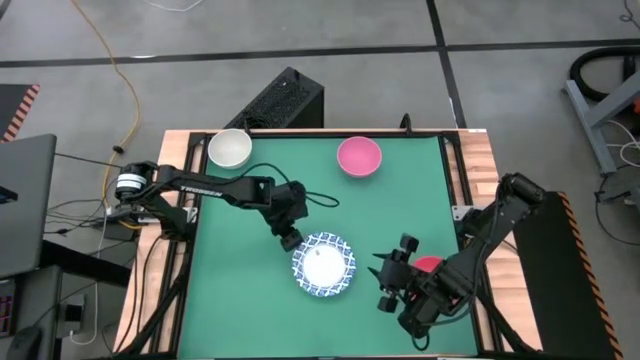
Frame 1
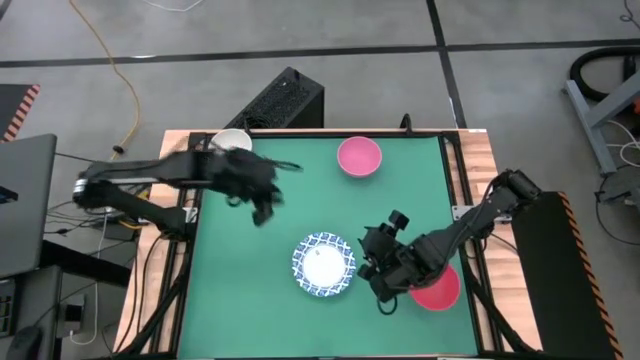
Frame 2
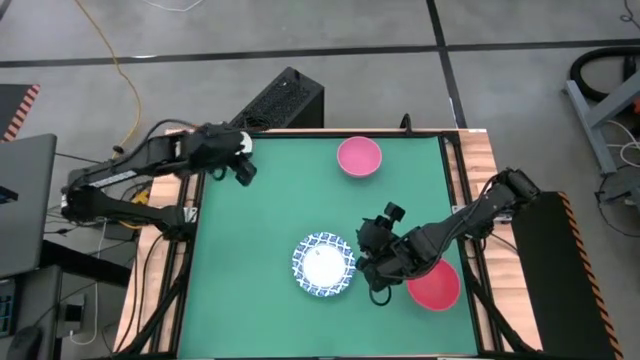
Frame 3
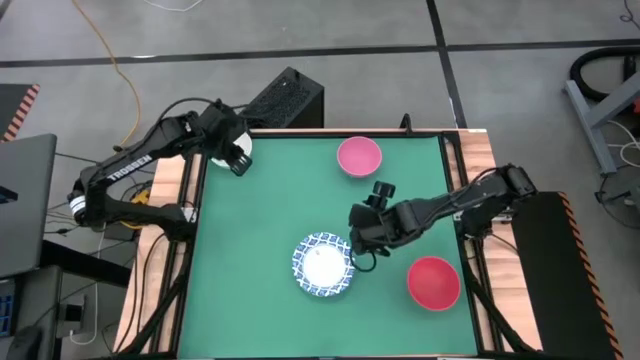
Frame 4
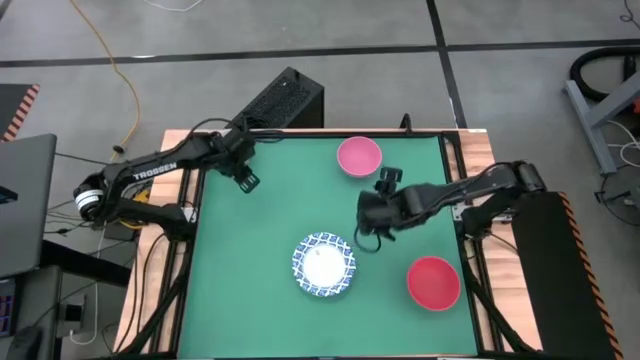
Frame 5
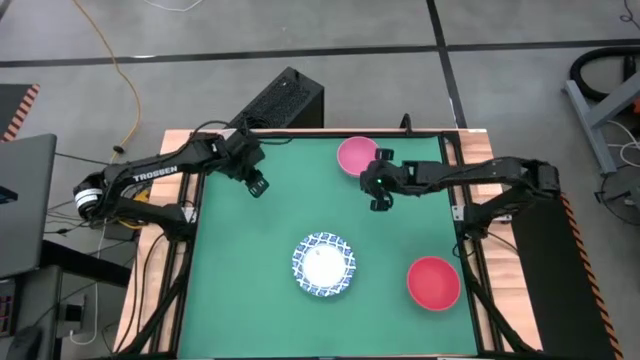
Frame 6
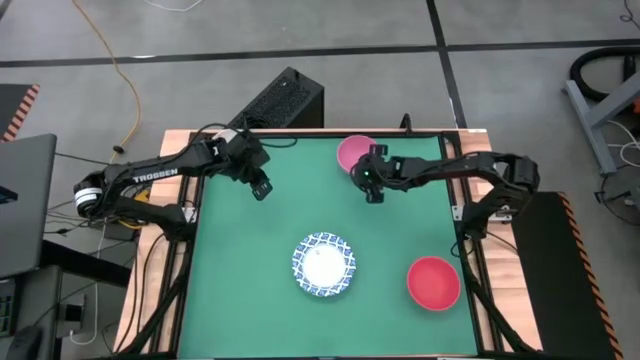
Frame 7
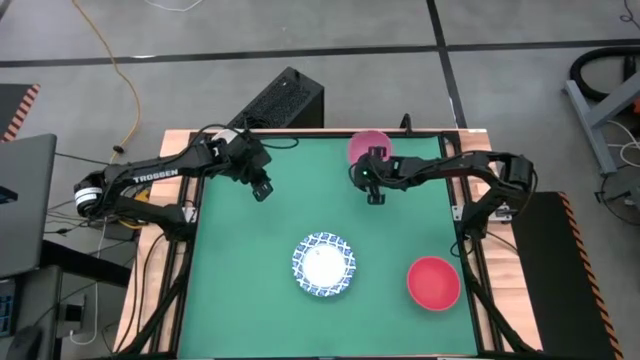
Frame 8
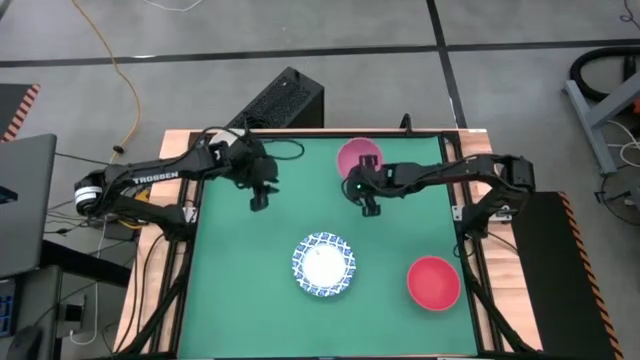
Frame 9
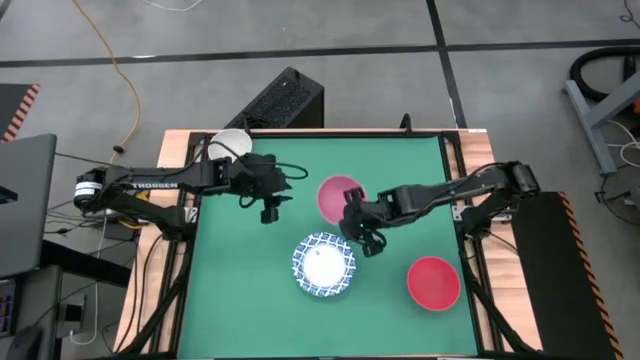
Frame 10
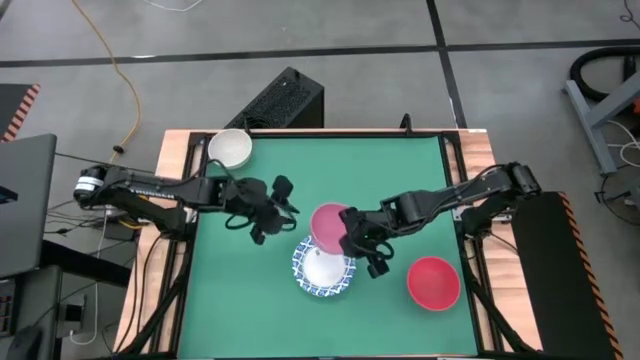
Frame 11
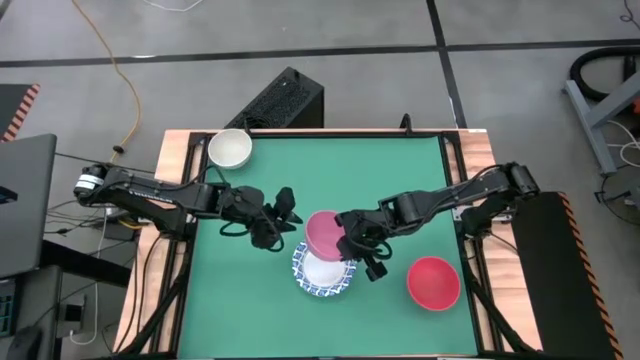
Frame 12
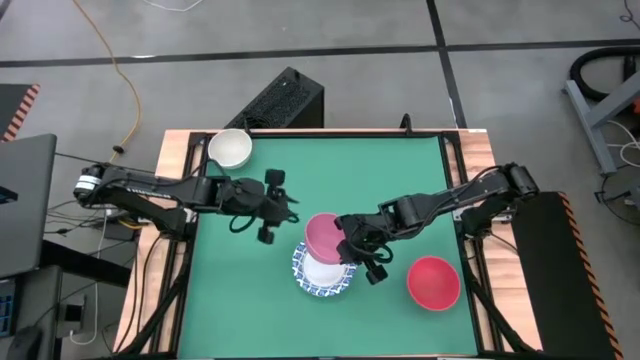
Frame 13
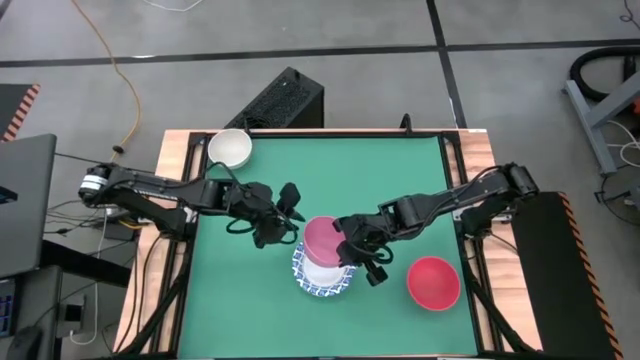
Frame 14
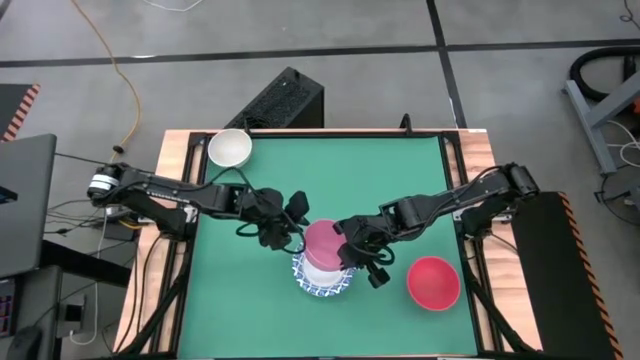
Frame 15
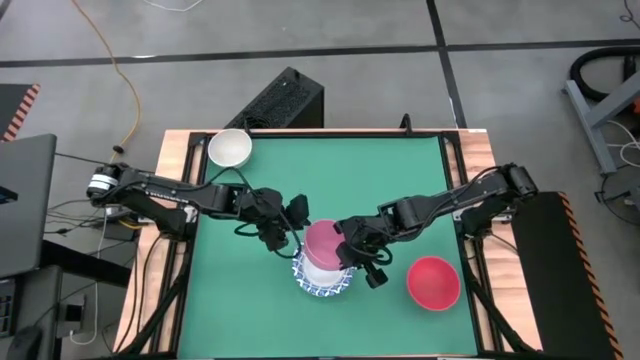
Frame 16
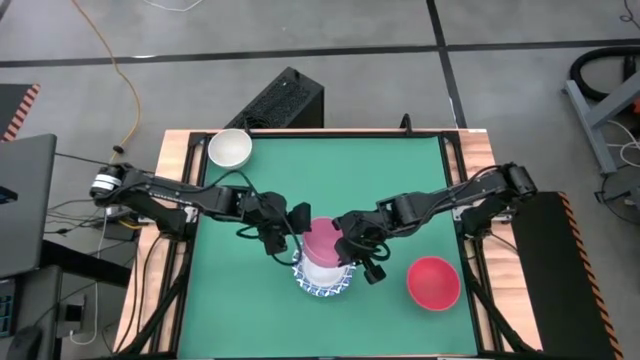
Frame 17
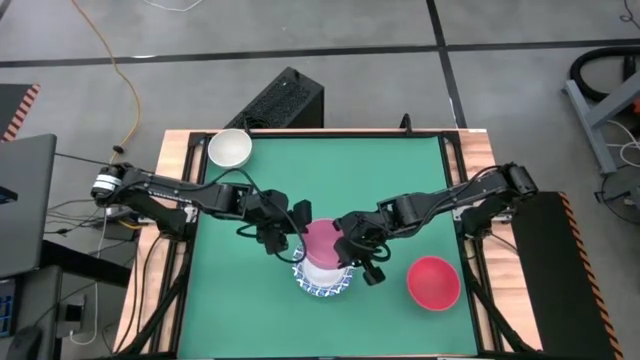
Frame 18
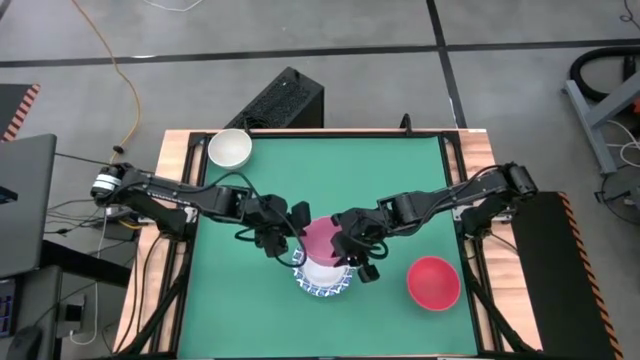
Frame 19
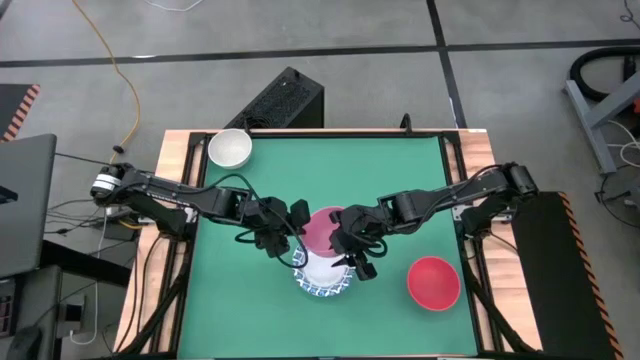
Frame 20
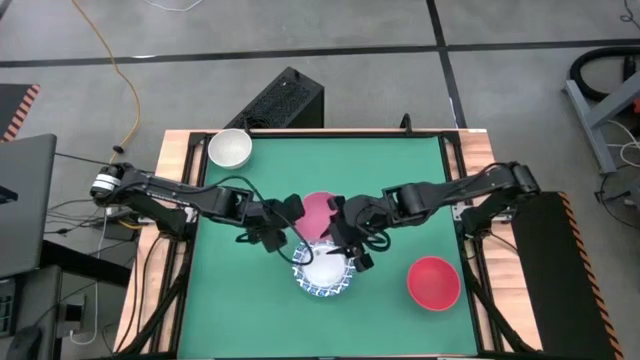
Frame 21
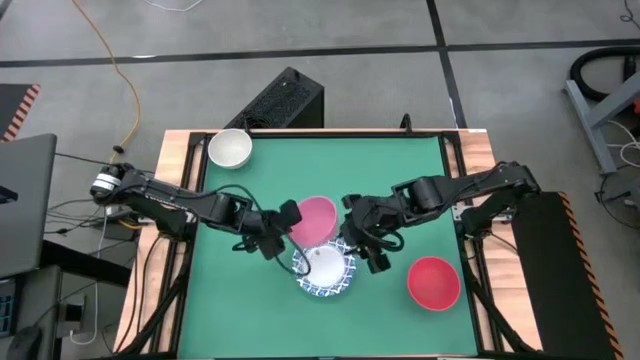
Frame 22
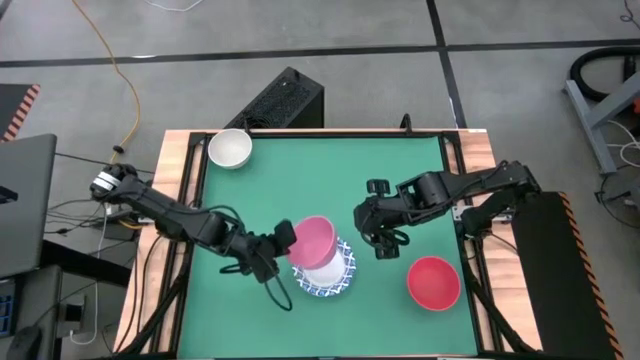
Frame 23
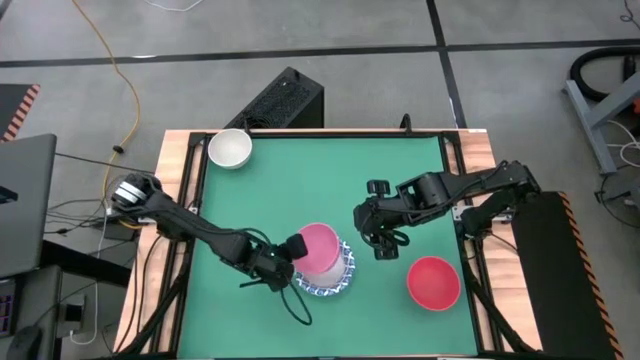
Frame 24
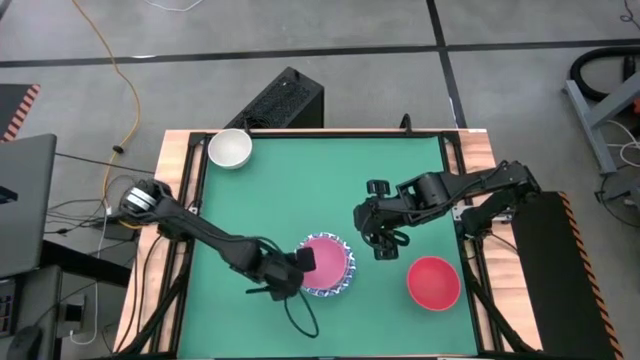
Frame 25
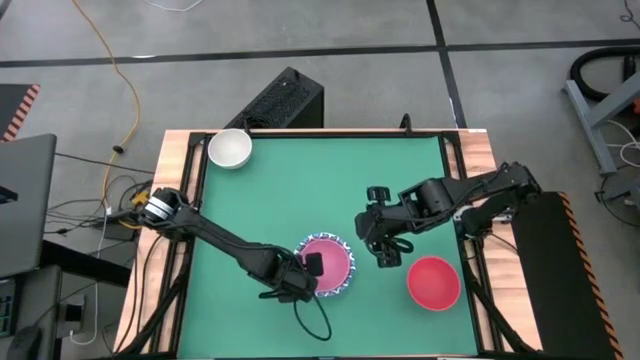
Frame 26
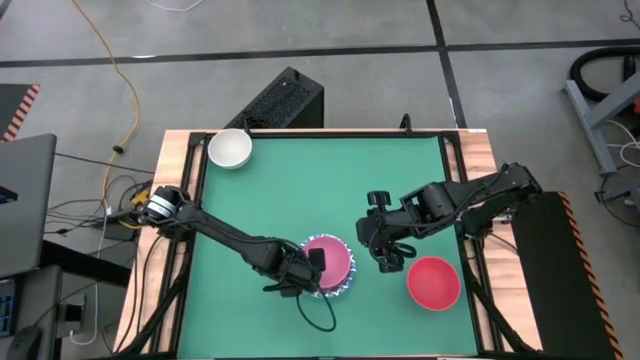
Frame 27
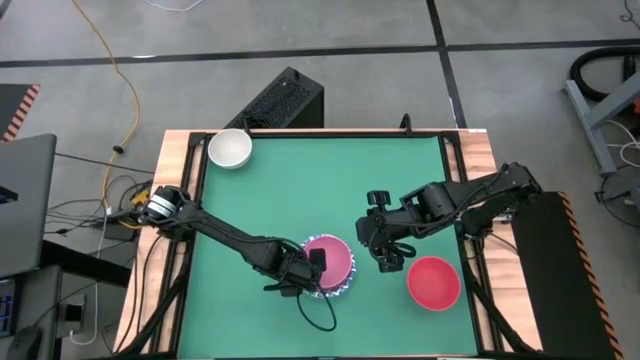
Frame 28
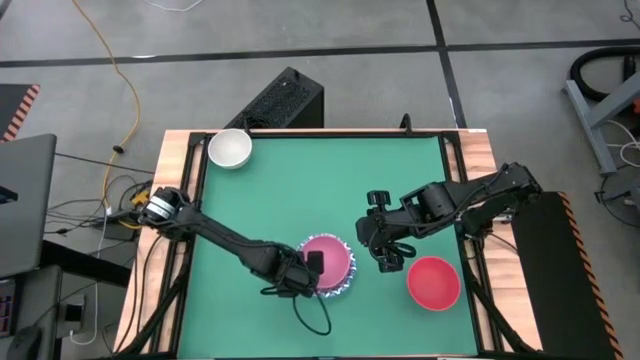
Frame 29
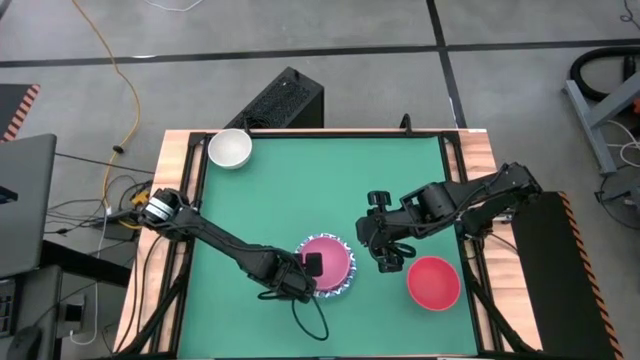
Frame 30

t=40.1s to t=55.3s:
Stack the pink bowl on top of the white with blue patterned bowl

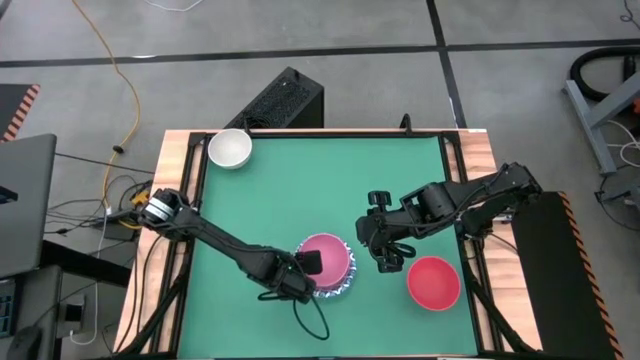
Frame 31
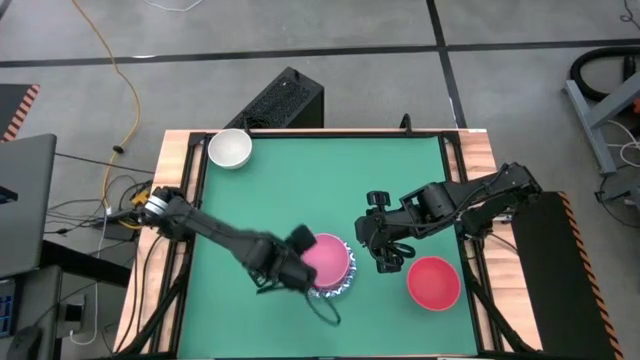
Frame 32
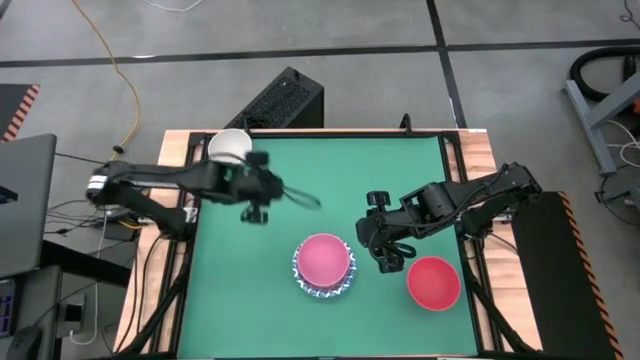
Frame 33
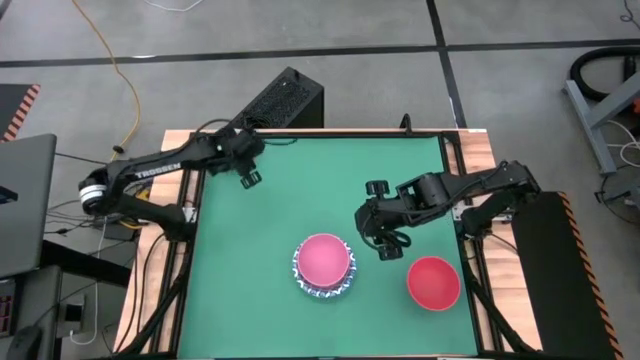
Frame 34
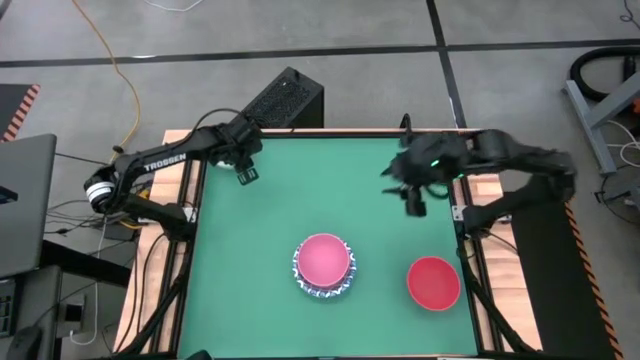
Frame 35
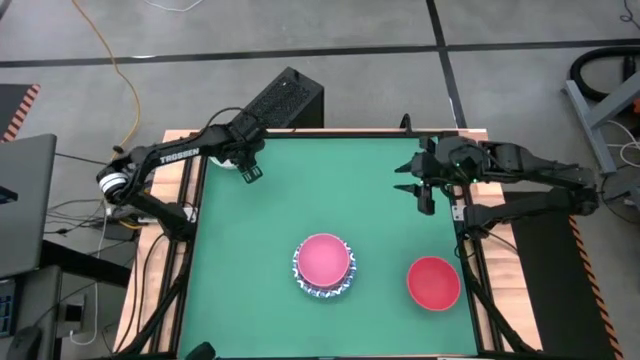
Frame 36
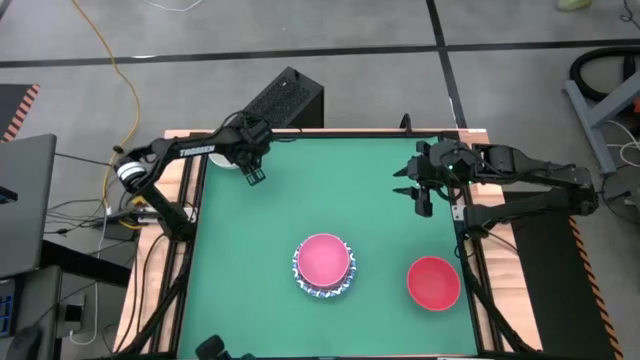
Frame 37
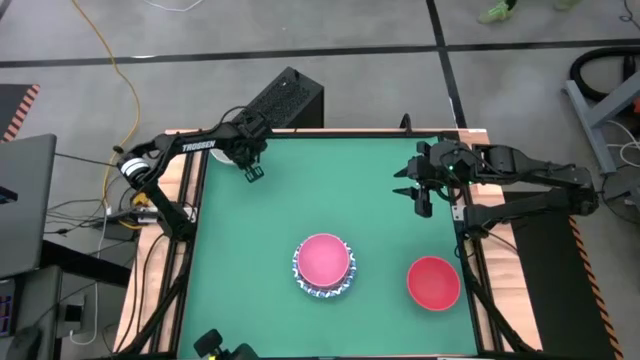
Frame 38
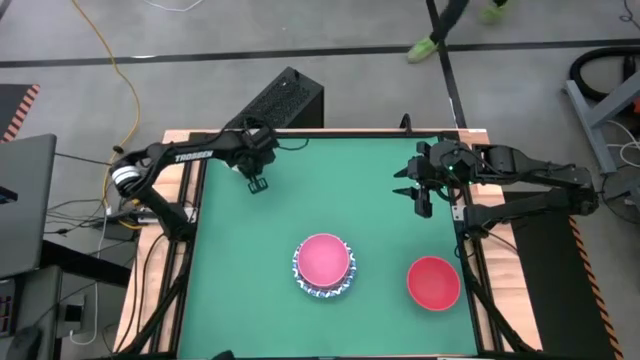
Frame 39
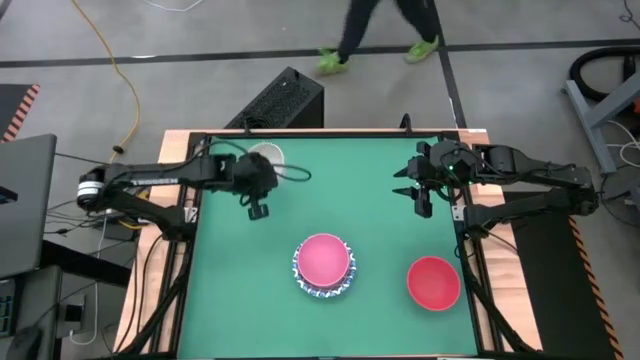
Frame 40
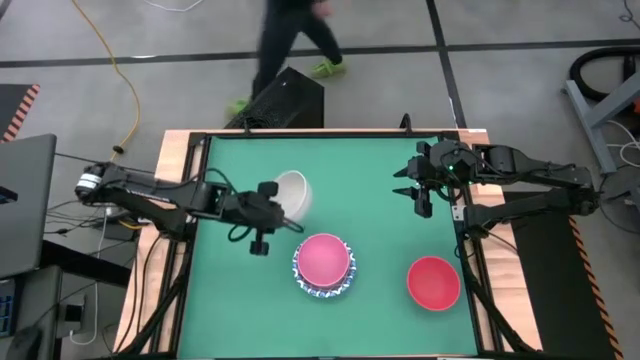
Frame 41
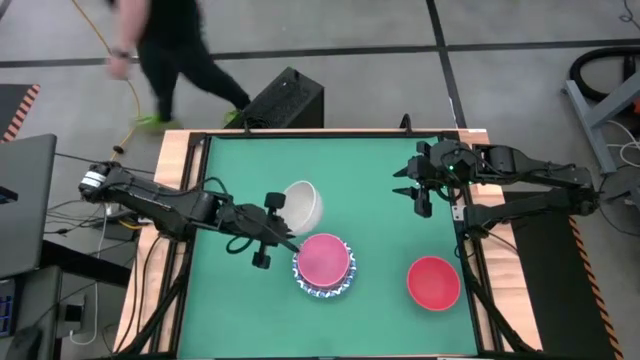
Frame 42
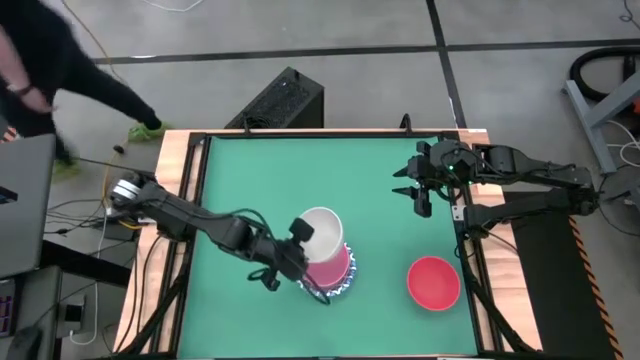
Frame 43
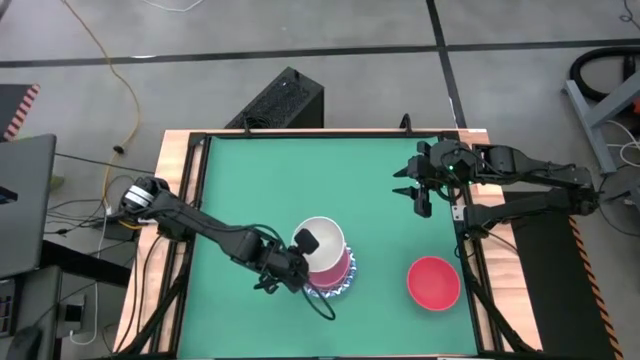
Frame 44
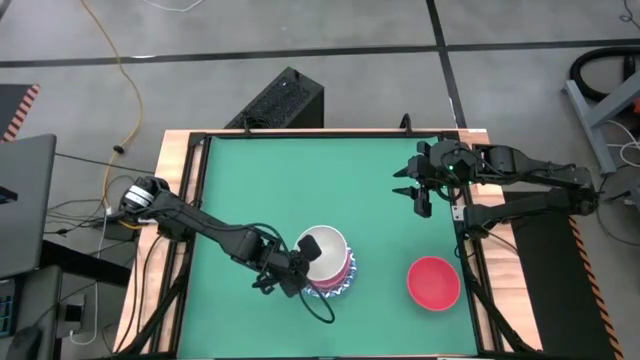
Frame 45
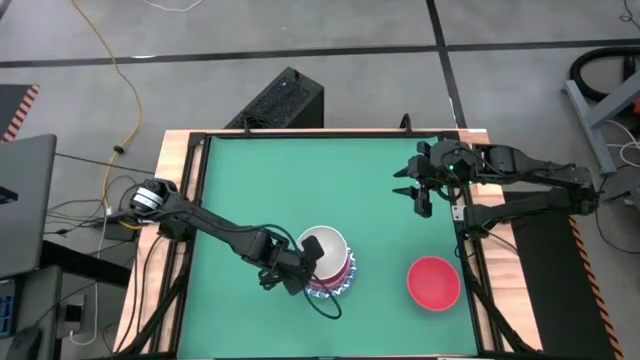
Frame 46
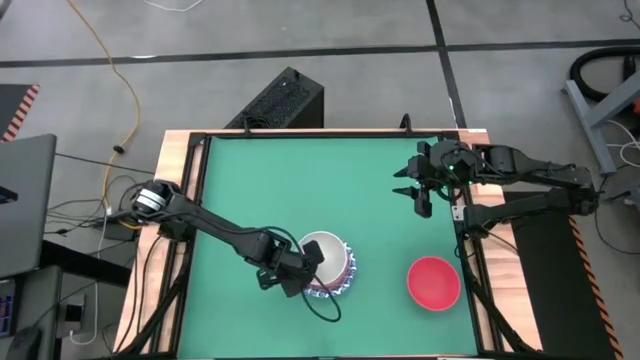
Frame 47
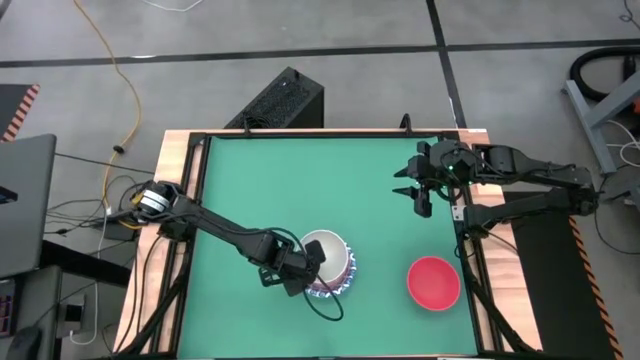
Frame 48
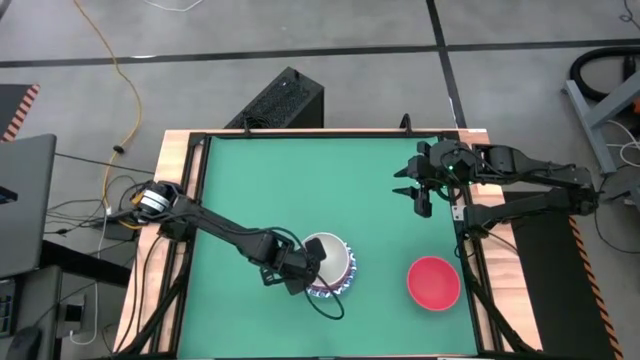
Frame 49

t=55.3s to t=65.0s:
Stack the white bowl on top of the pink bowl
